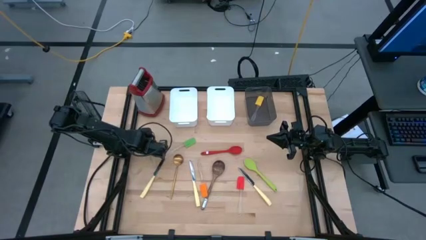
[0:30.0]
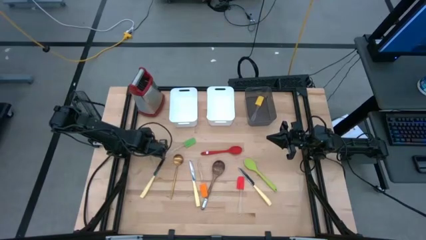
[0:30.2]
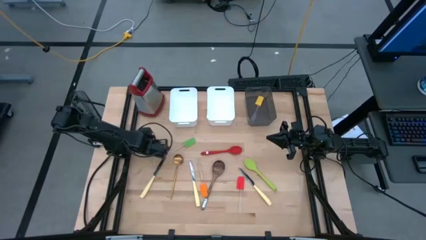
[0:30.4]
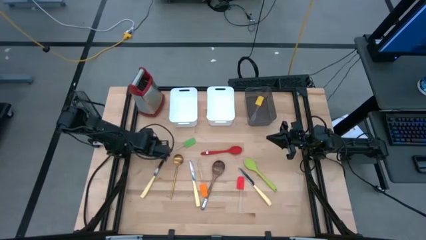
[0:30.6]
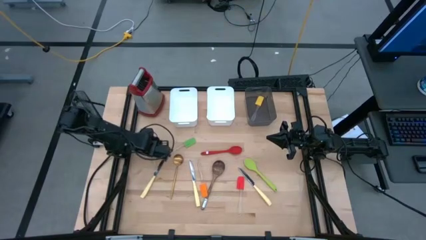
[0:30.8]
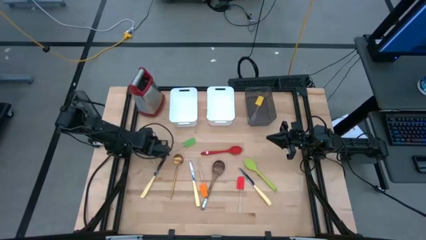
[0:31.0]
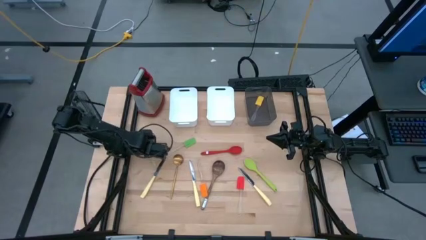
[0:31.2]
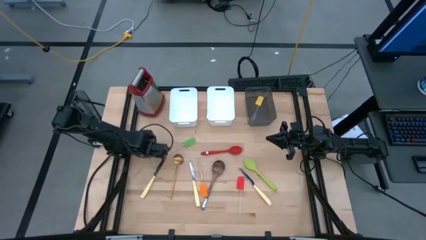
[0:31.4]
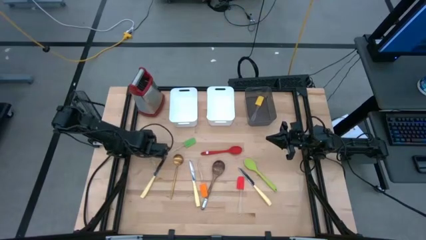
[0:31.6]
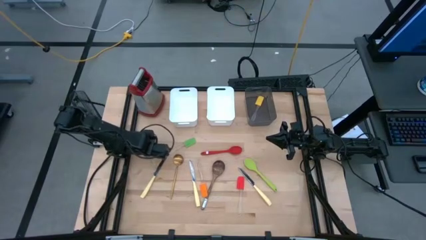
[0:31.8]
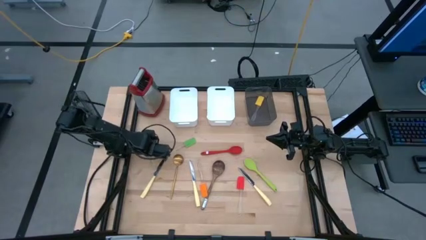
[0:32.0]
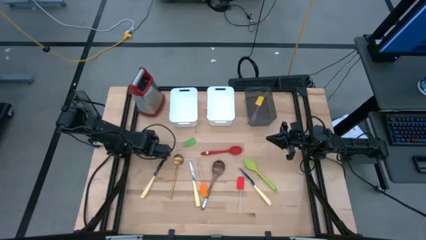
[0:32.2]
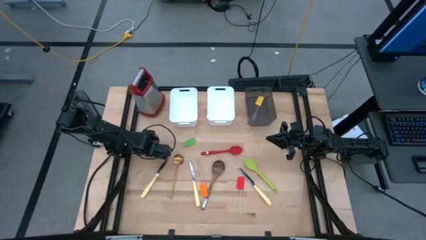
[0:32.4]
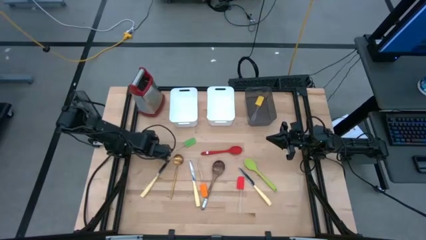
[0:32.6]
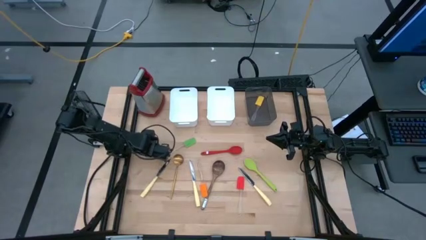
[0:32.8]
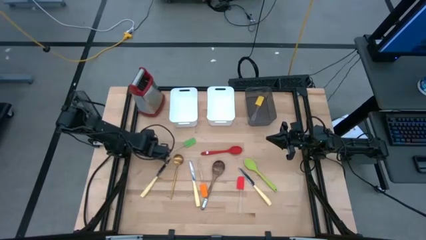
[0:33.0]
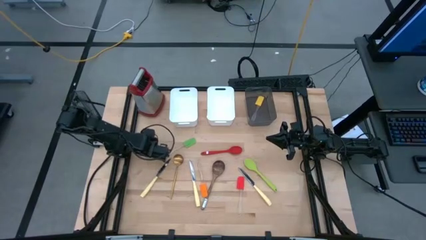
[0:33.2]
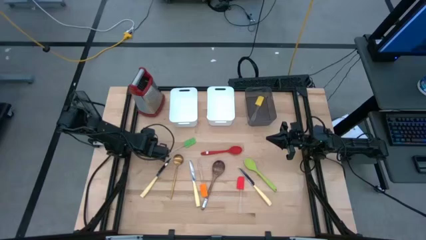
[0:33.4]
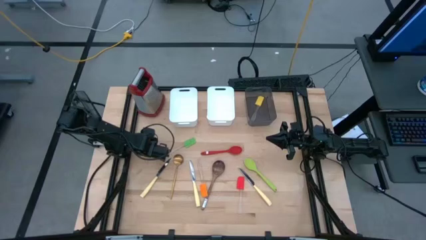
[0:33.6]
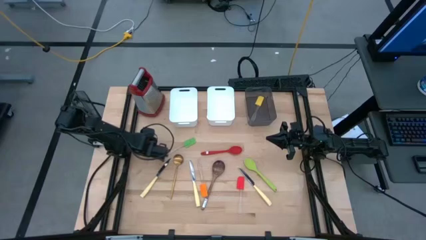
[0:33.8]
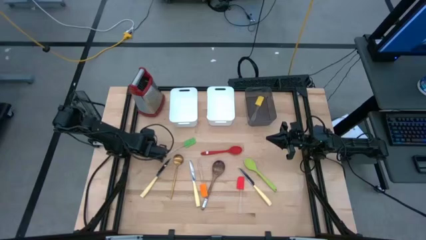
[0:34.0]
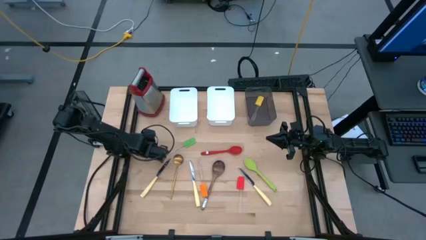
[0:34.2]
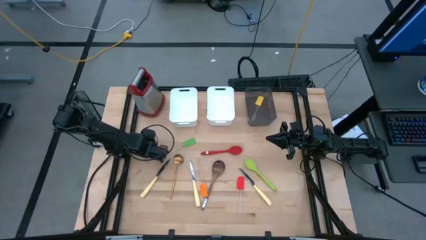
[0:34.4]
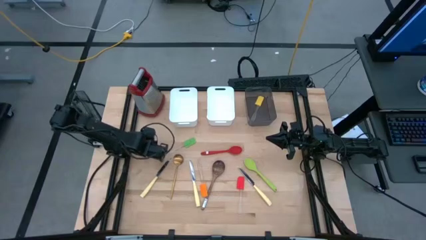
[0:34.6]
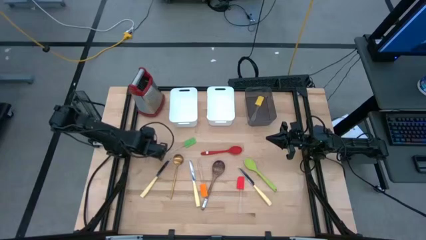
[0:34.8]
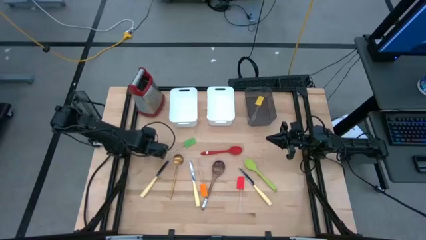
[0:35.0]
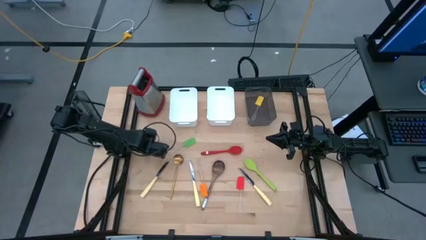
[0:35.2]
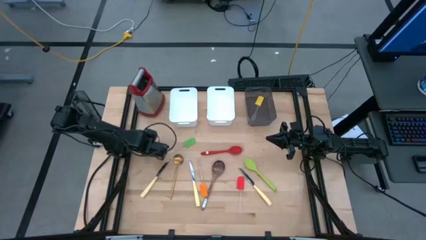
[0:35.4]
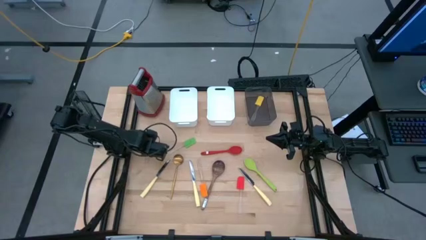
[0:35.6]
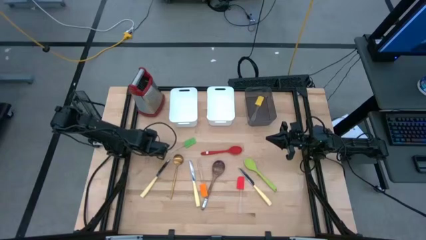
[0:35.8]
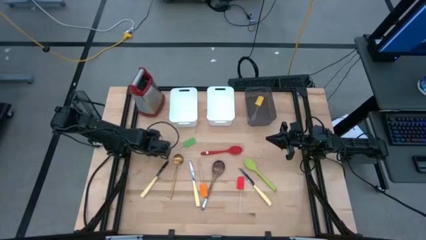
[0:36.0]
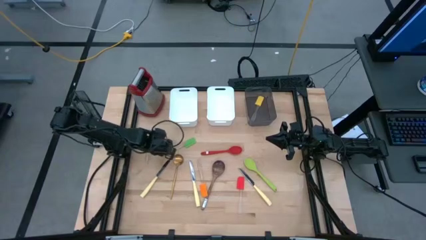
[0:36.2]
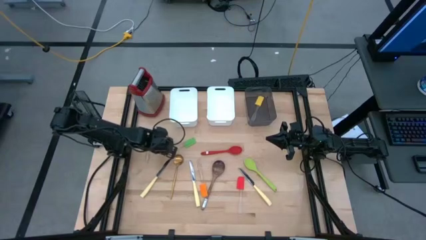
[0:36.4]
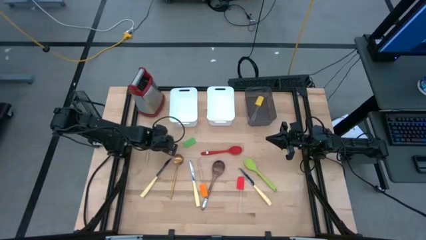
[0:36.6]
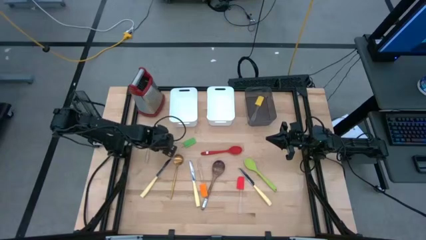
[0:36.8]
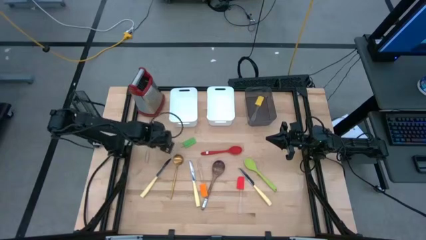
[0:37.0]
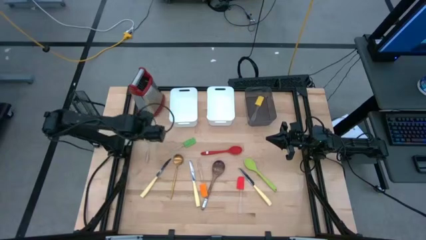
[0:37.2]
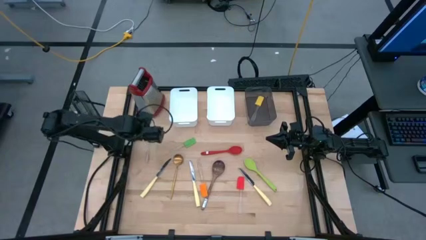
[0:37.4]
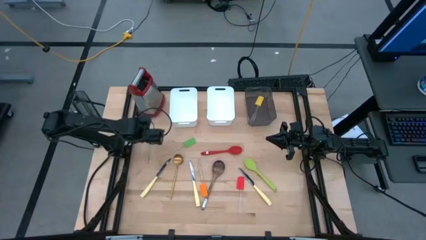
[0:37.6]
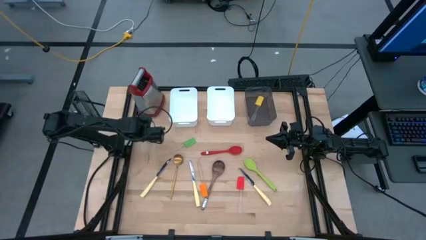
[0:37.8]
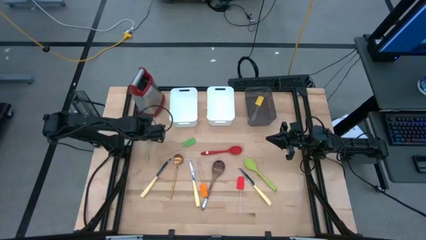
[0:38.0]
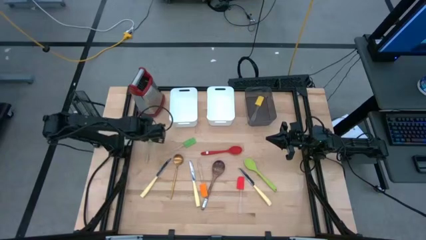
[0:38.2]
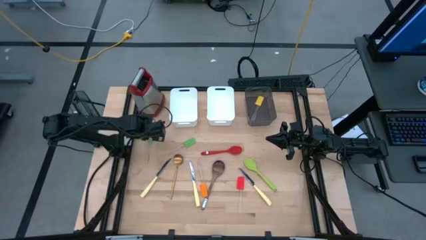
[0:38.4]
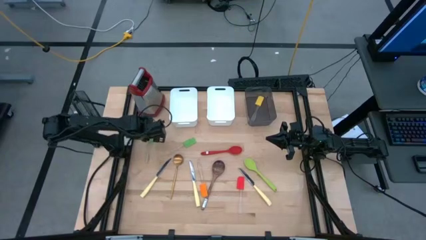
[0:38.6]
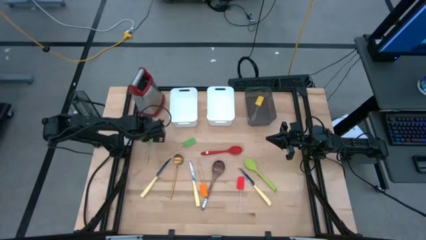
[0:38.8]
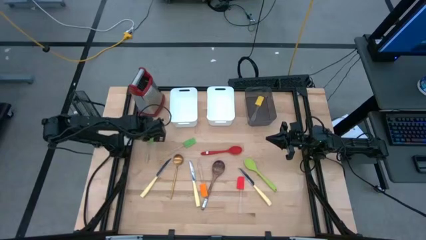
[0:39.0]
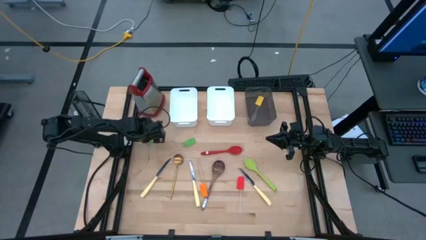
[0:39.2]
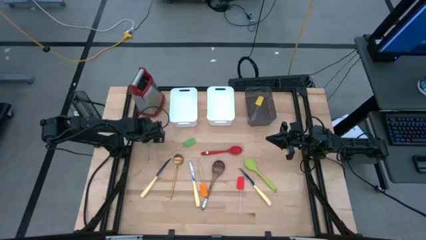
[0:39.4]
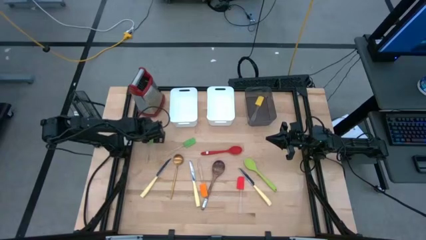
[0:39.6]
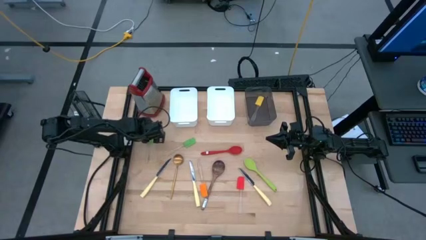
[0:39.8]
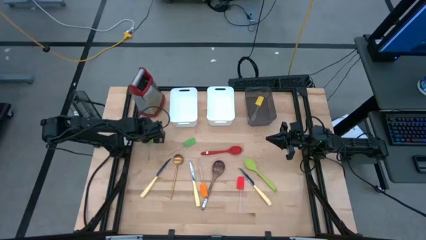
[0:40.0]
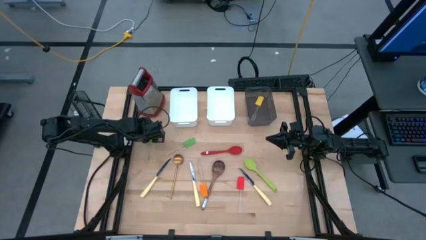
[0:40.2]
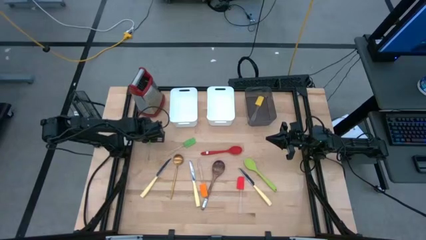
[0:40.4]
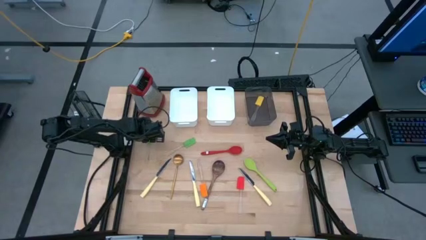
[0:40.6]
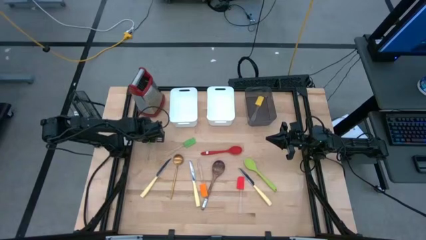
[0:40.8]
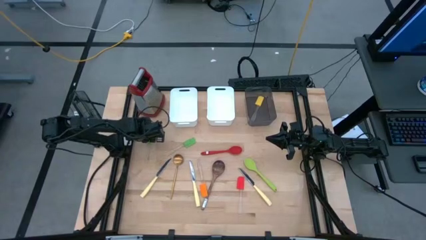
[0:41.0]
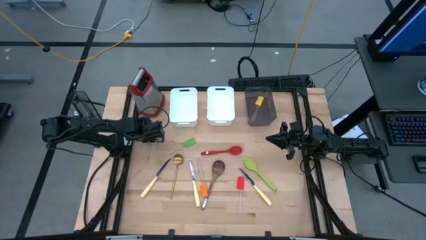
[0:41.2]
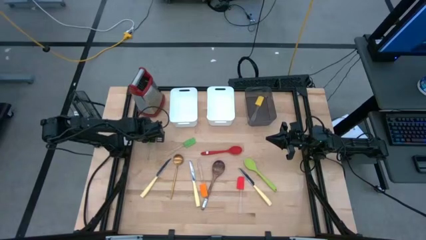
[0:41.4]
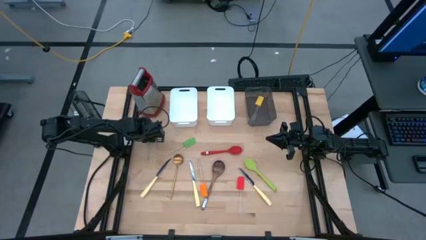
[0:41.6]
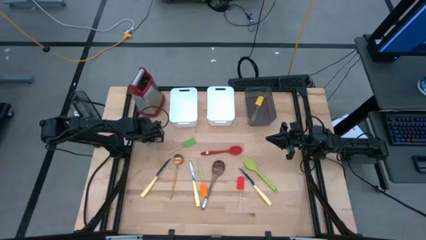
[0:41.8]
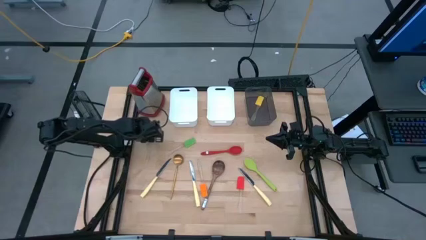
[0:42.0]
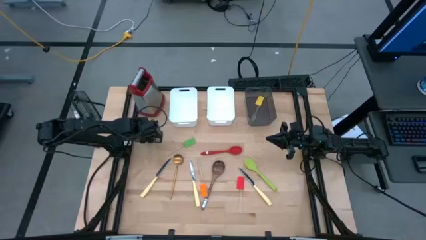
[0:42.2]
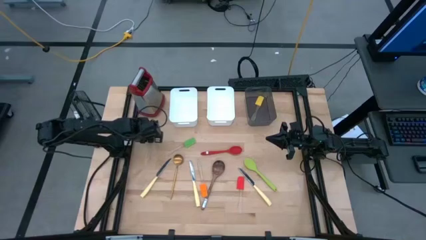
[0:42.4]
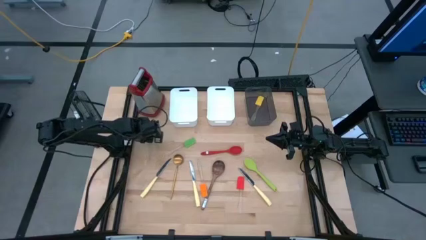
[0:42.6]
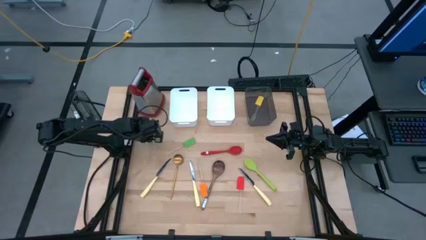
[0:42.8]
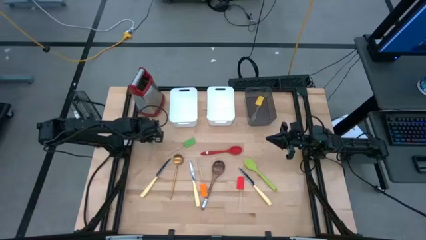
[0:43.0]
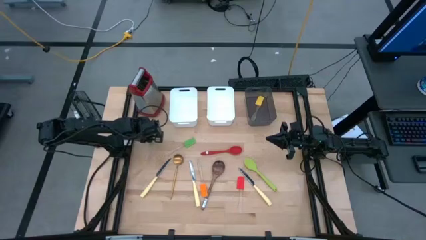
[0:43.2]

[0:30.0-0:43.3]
Task: Pick & Place Kitchen Items
Put the green silicone spatula into the black bin
